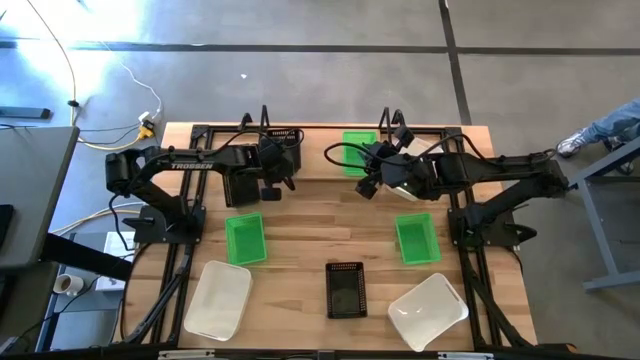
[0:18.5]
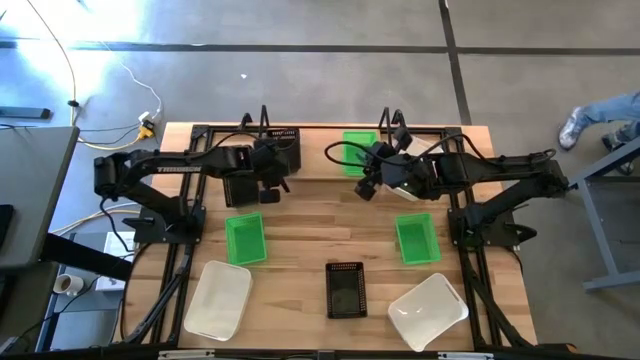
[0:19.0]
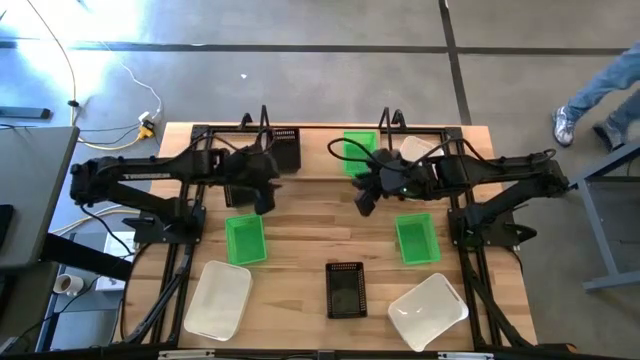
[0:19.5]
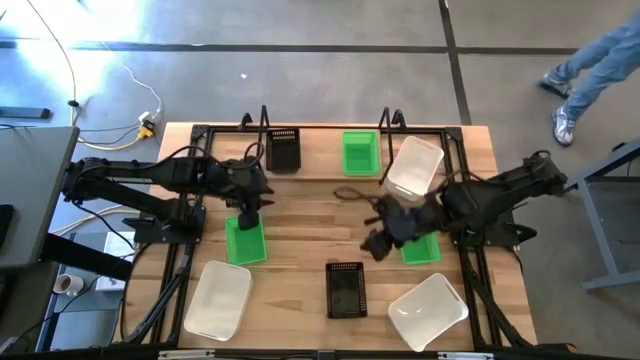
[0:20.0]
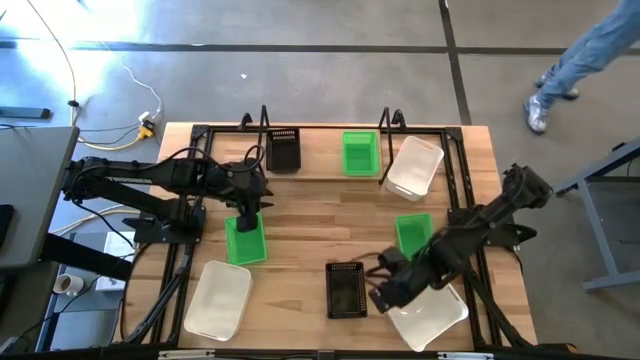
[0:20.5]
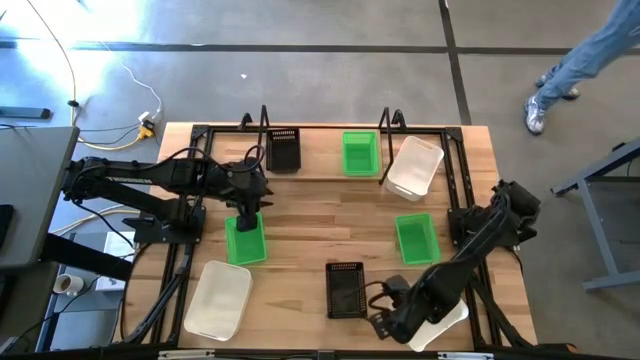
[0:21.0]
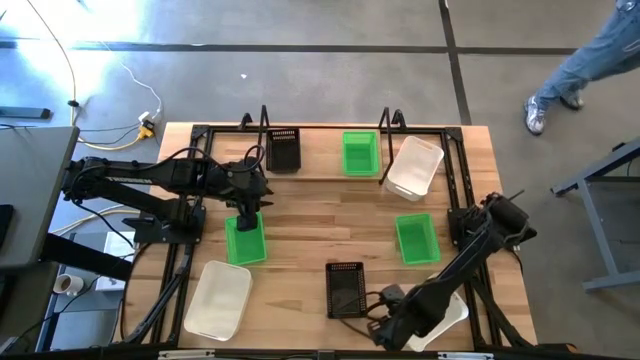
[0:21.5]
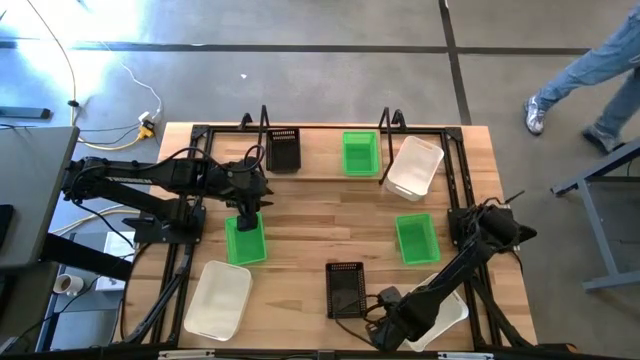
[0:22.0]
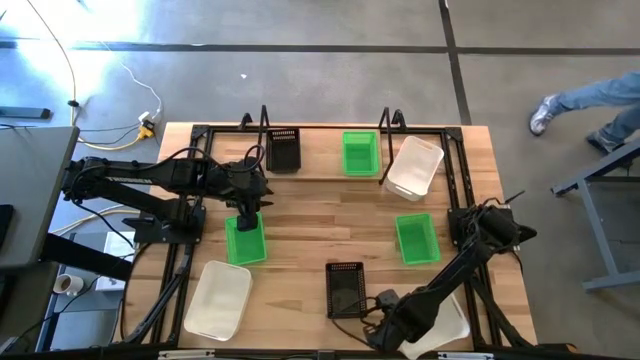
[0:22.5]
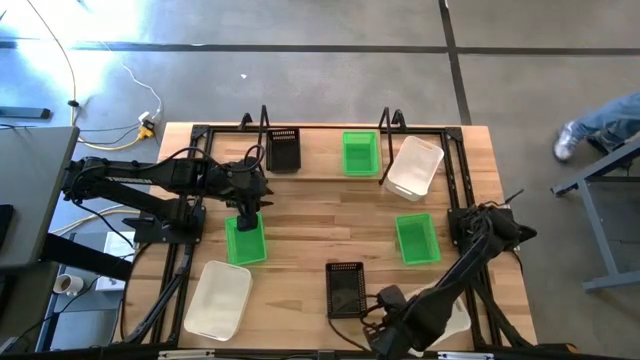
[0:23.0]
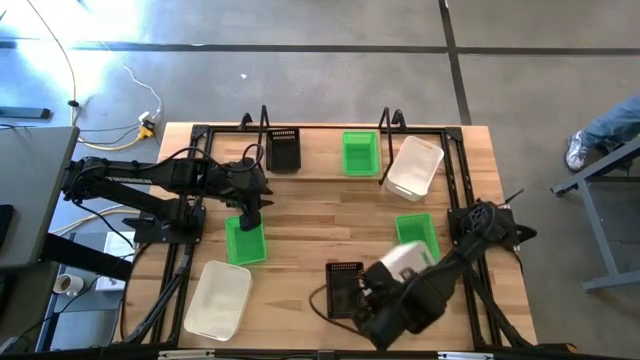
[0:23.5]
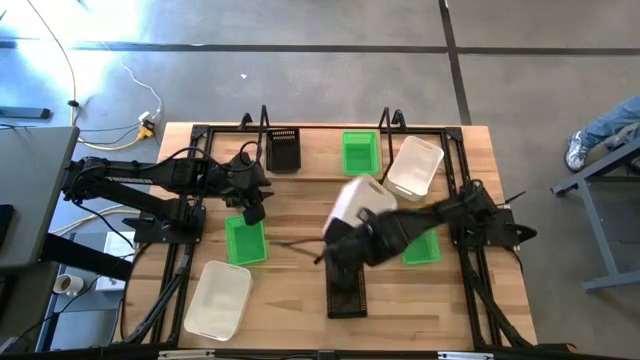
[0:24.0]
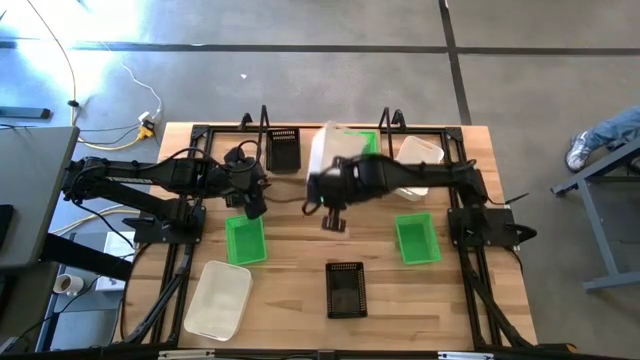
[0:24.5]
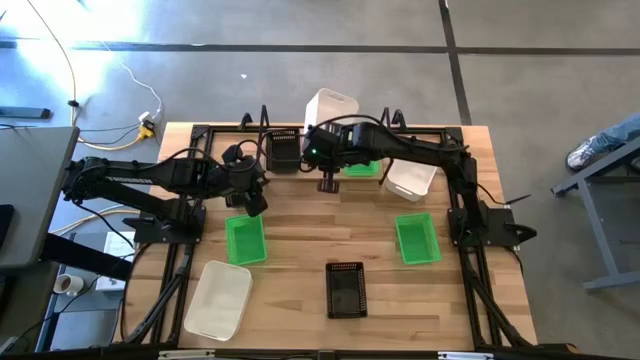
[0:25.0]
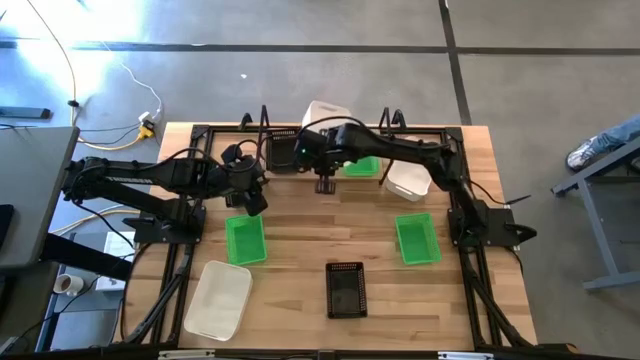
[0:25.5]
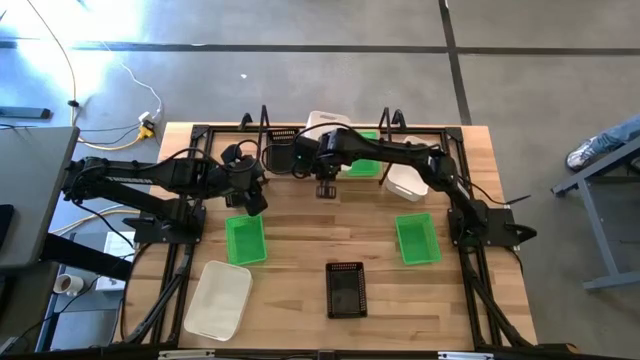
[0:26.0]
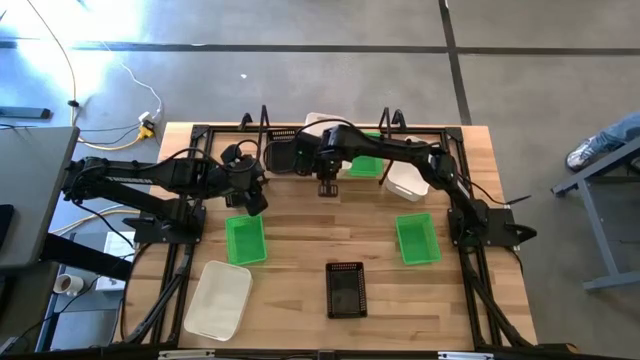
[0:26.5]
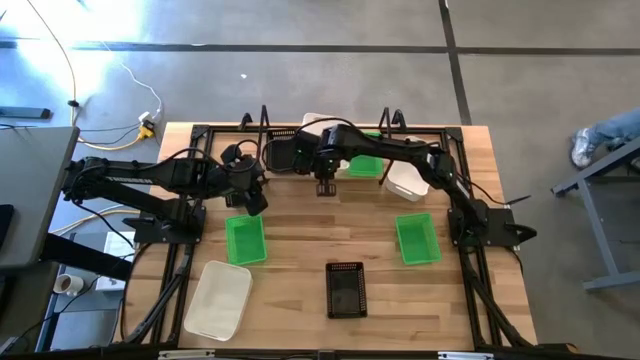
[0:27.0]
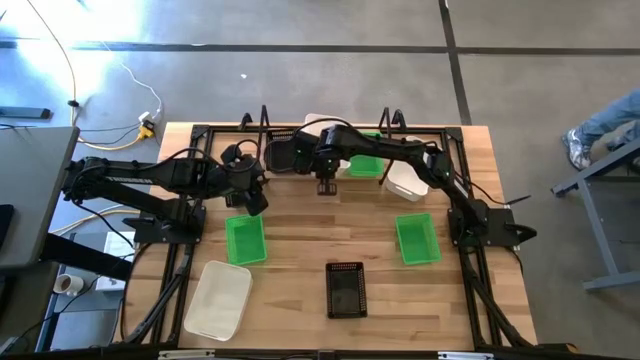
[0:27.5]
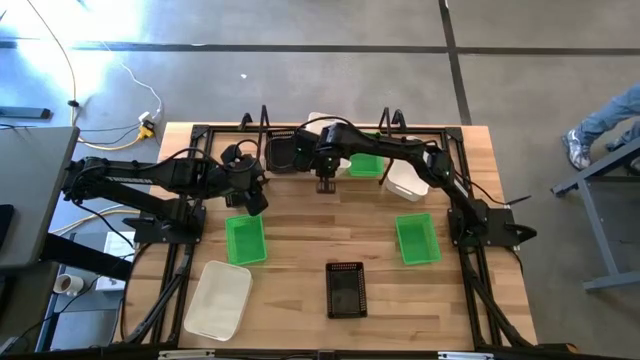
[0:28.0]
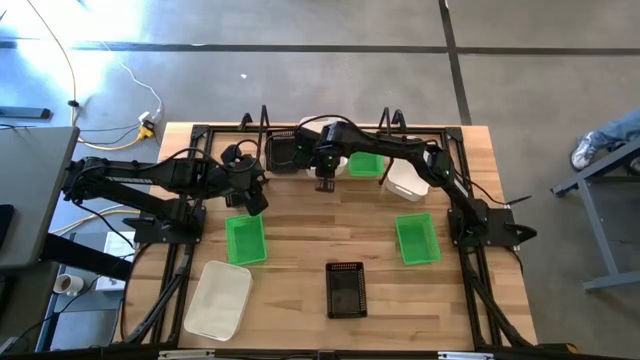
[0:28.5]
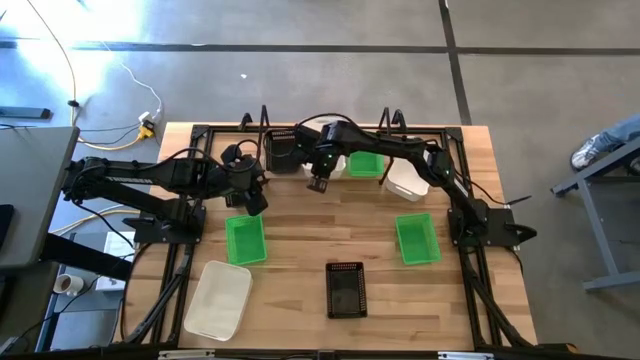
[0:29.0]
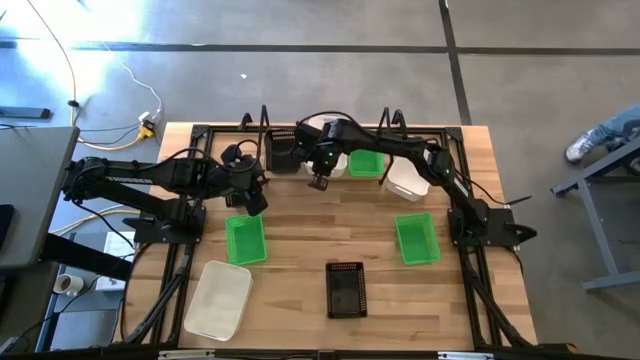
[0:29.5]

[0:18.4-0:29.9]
Task: Stack baskets on shelf by color
Put the bottom right white basket on the shelf

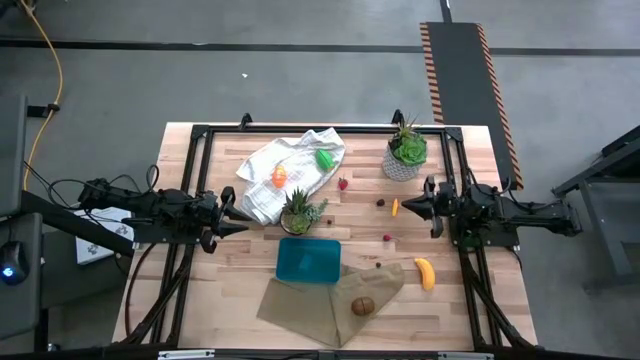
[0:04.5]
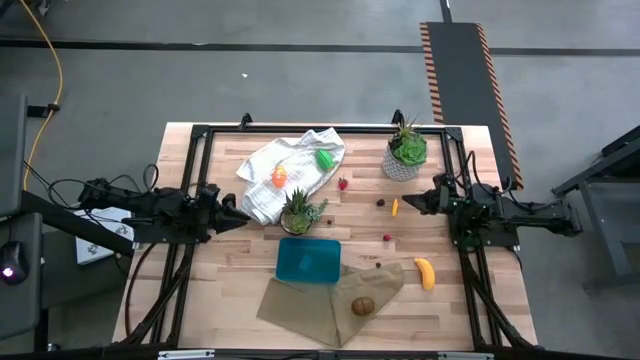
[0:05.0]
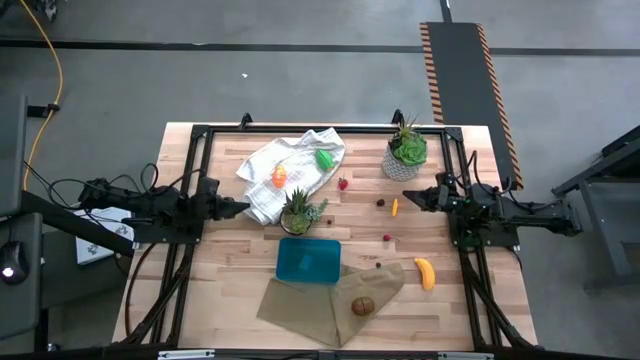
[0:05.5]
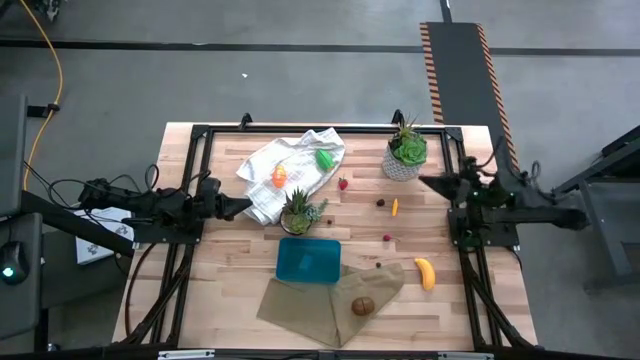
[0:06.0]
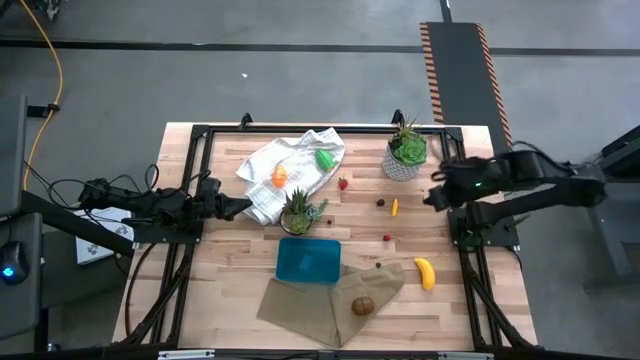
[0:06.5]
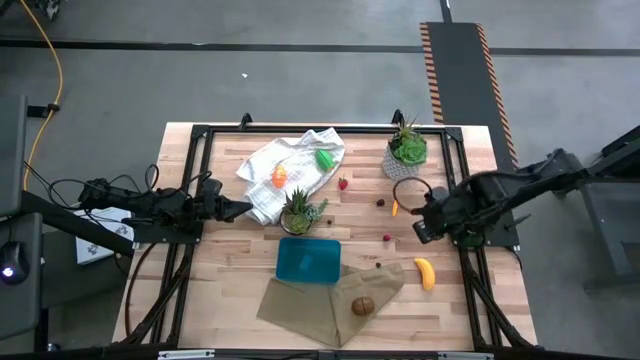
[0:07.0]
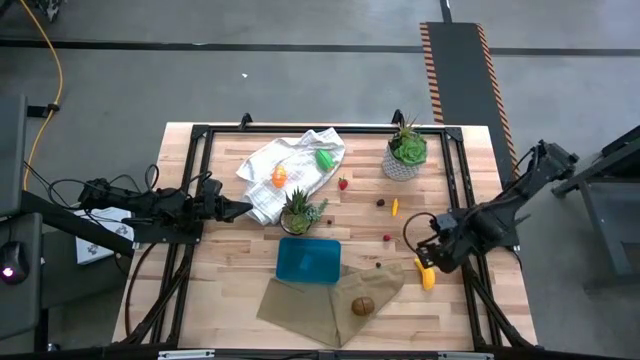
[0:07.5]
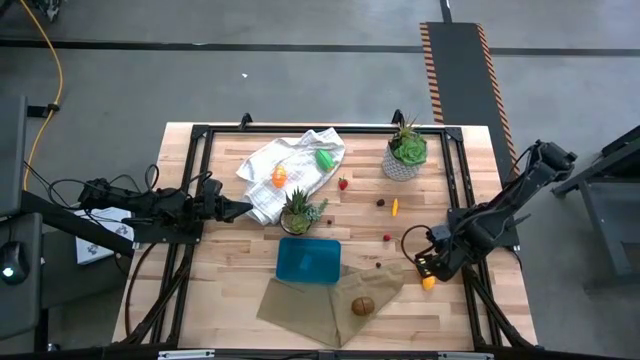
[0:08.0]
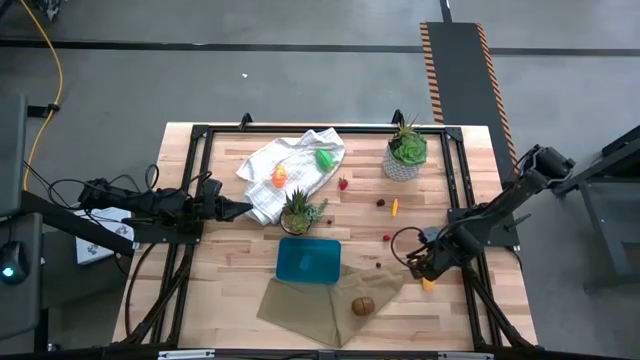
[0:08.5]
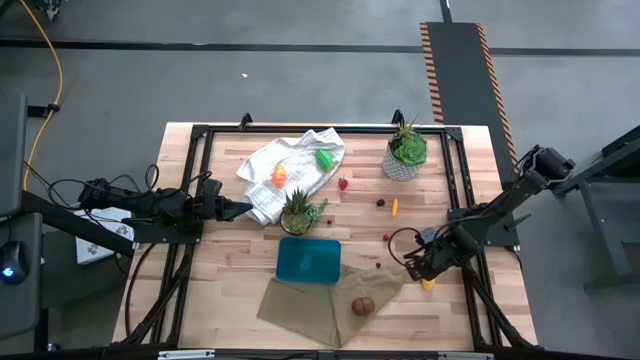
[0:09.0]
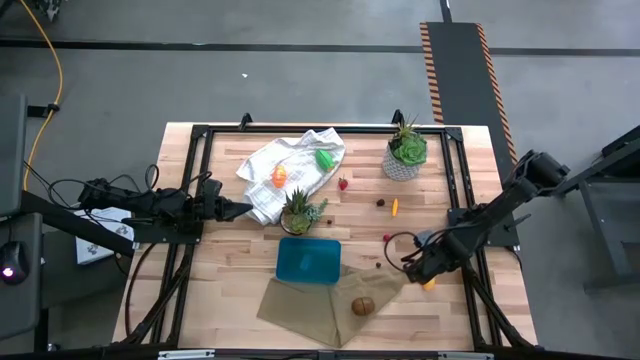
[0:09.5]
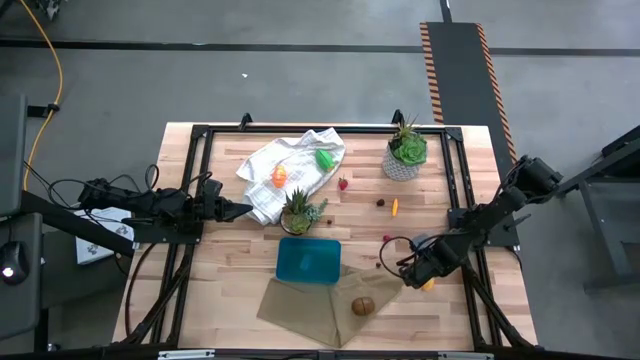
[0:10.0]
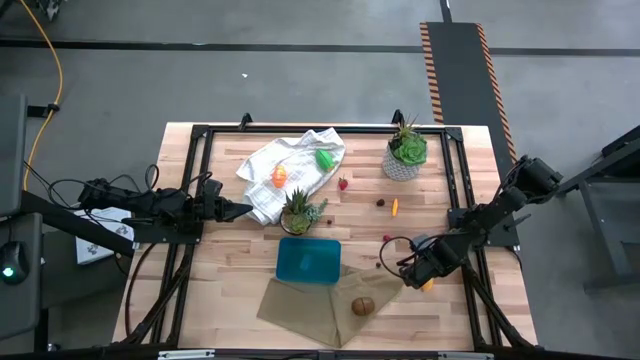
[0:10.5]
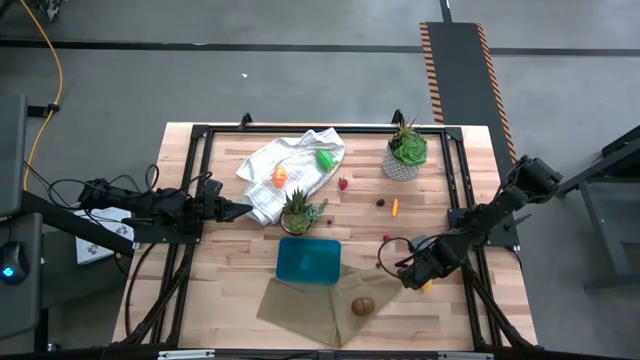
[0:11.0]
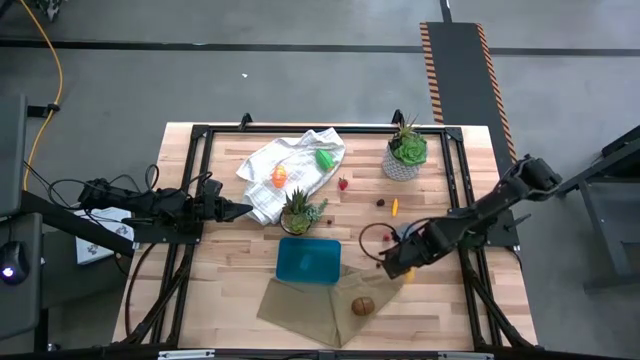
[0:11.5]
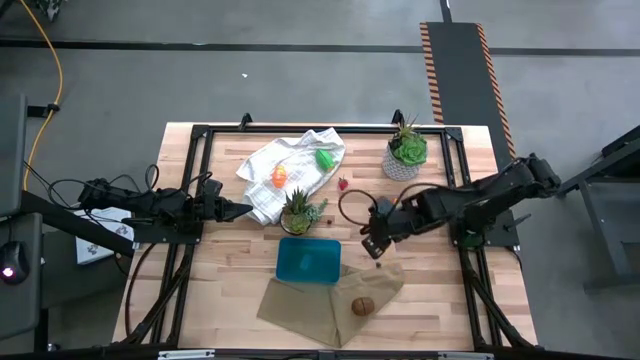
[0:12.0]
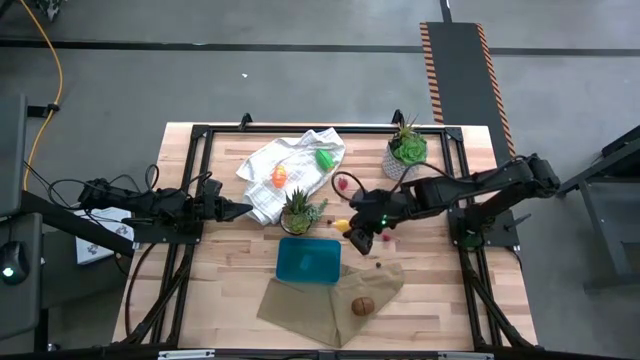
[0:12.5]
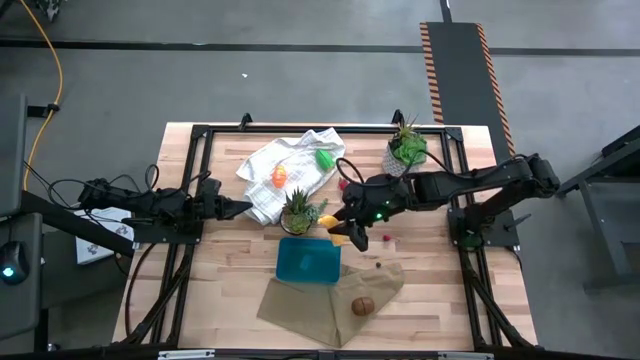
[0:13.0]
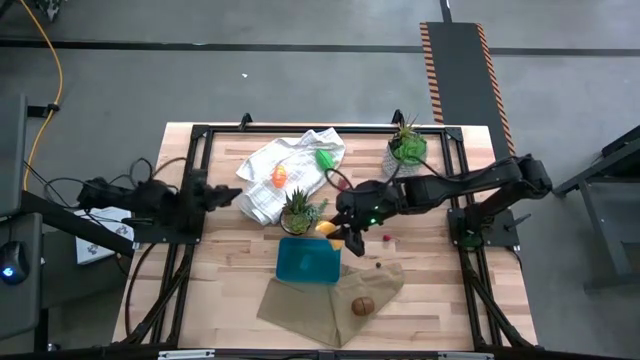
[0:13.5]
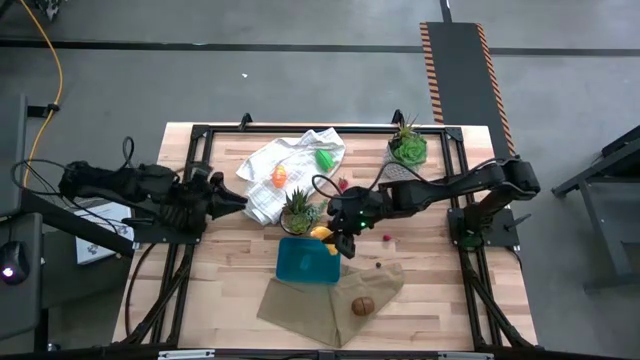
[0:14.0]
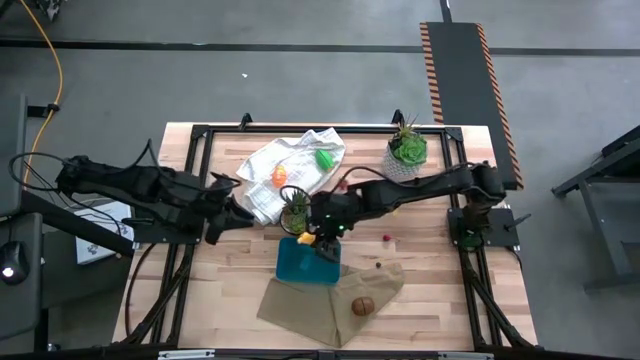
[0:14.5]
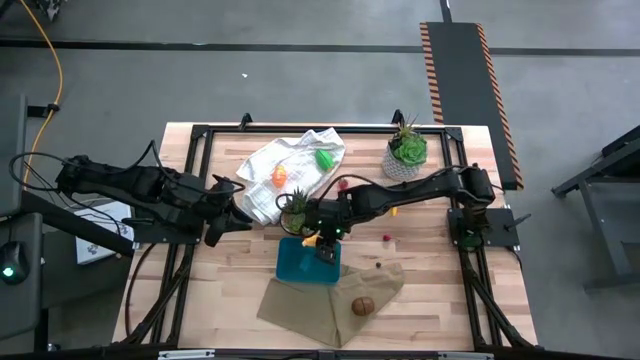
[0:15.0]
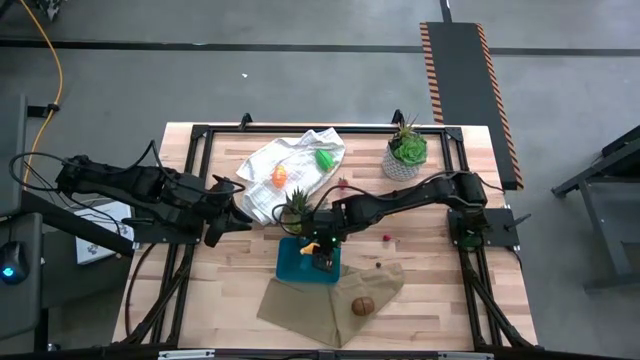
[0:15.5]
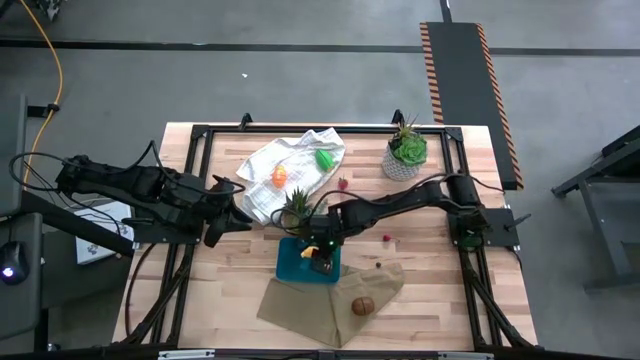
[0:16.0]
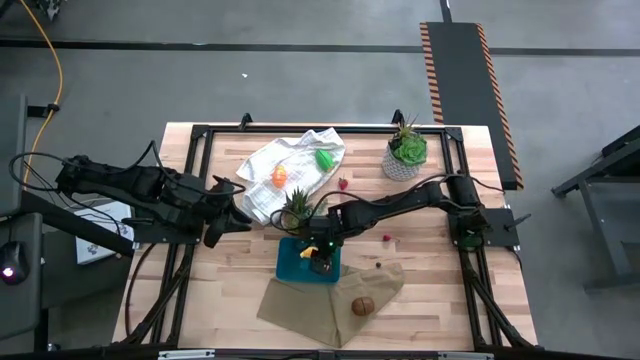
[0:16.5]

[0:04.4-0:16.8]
Task: Pick and placing Produce into tupperware
Put the banana into the blue bin
